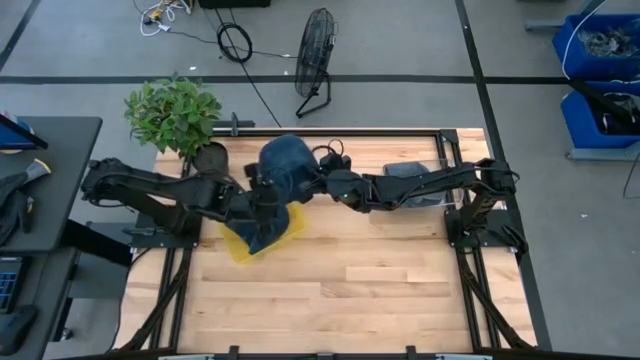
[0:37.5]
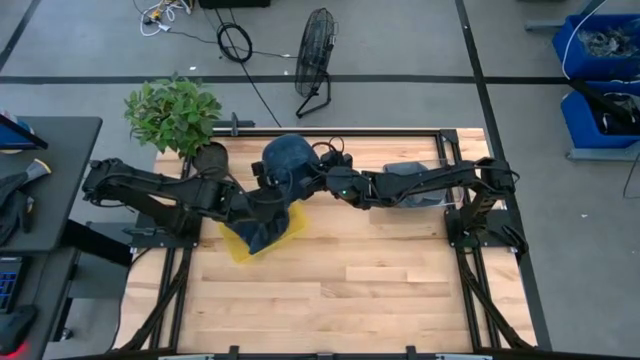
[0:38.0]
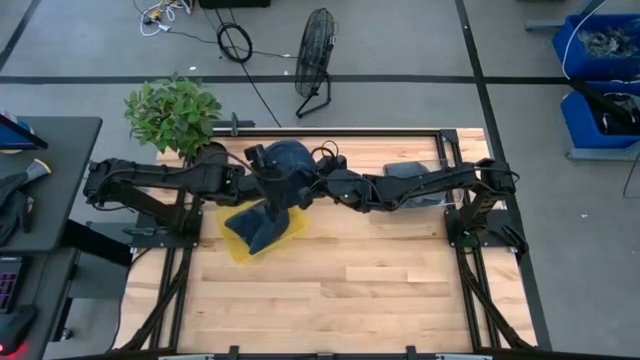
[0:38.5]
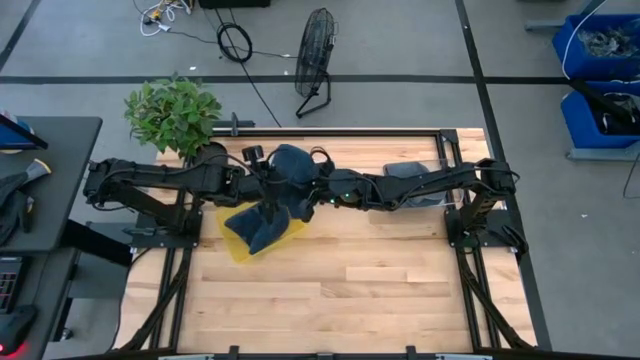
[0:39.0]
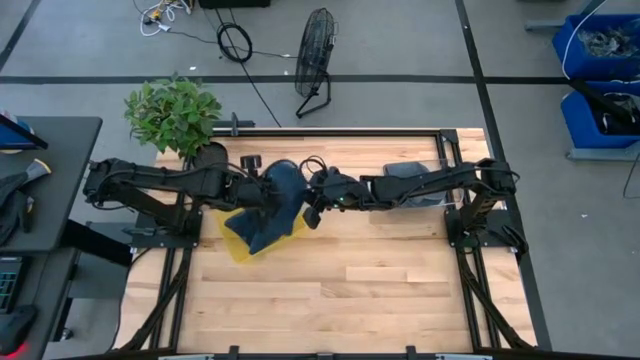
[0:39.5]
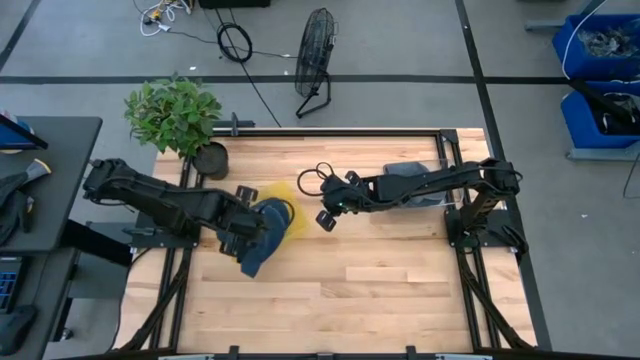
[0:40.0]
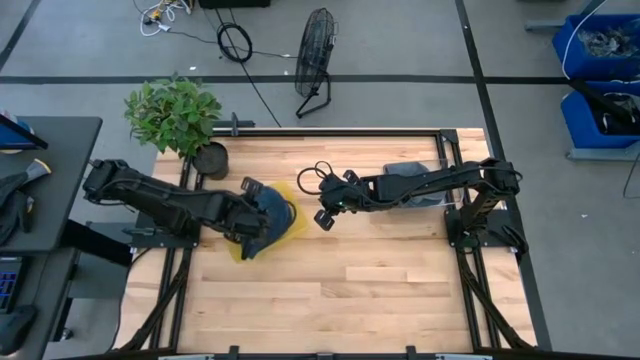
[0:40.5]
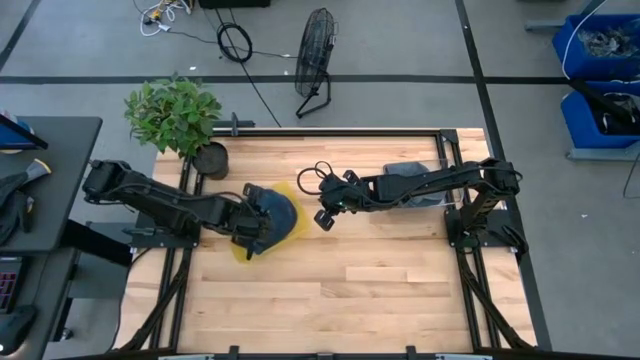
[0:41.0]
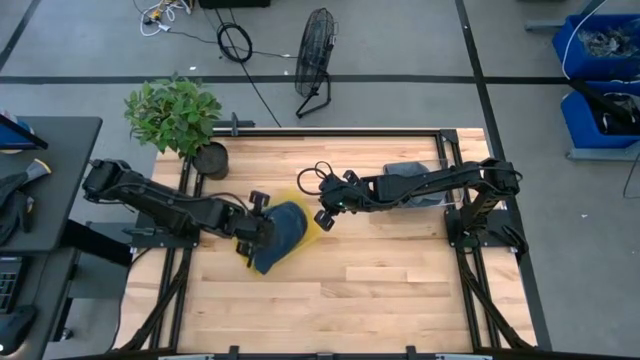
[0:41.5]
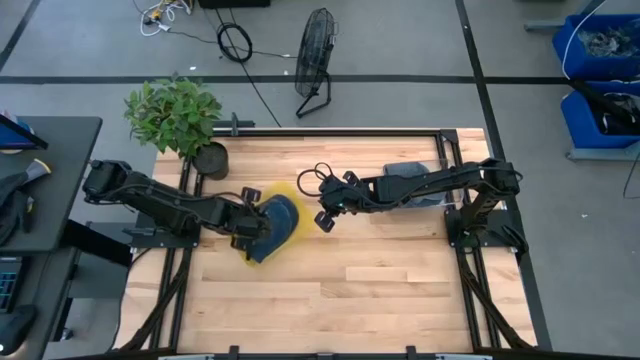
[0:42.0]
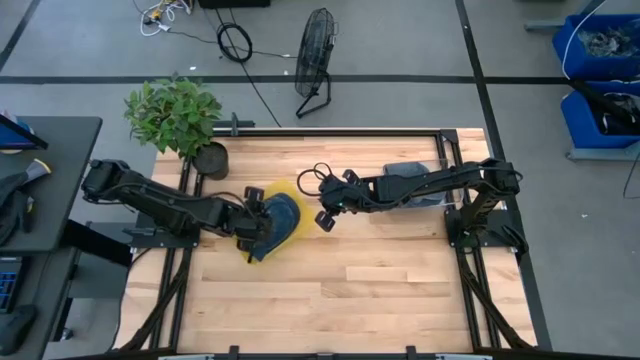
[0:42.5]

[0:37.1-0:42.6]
Task: Pick & Place hat
Put the blue cap into the yellow bin

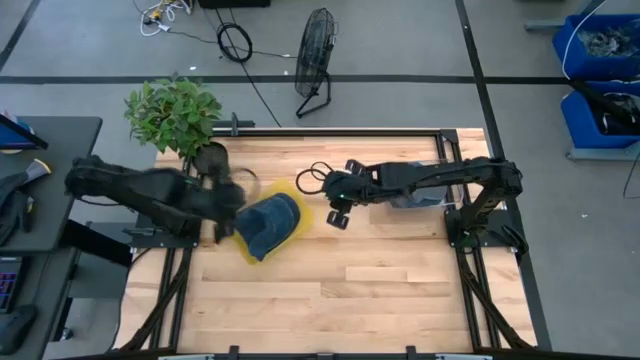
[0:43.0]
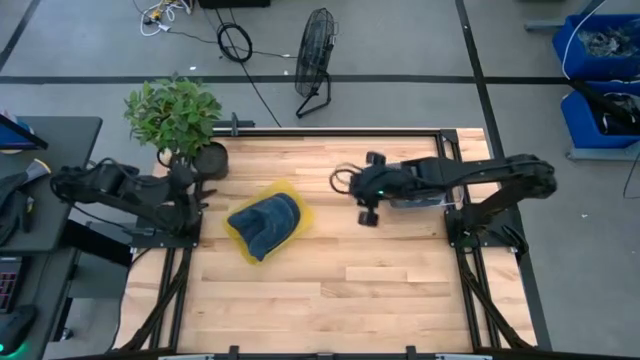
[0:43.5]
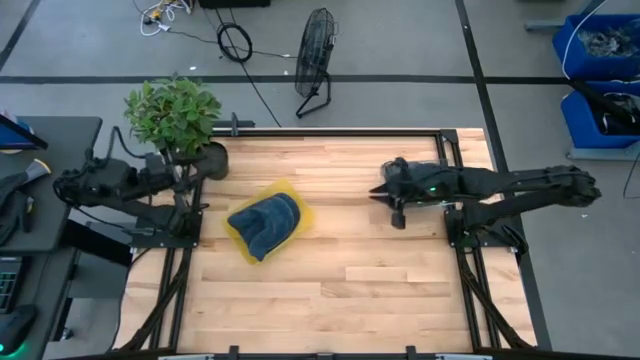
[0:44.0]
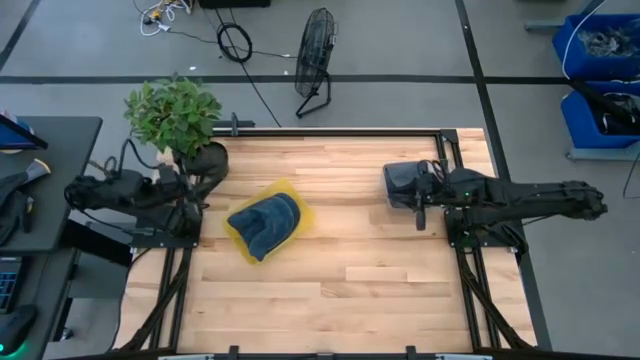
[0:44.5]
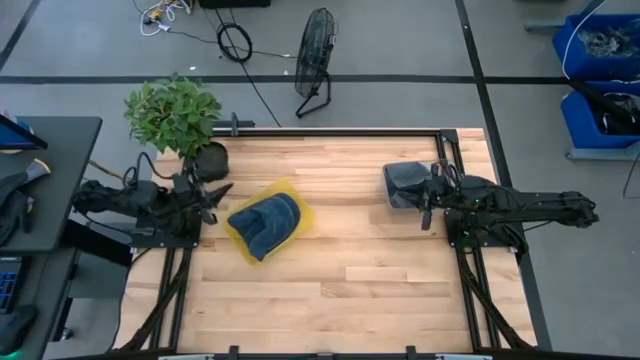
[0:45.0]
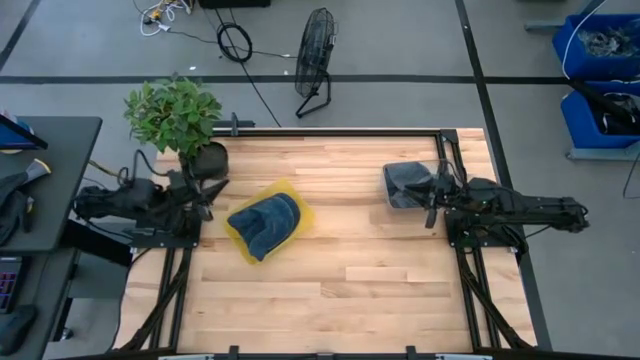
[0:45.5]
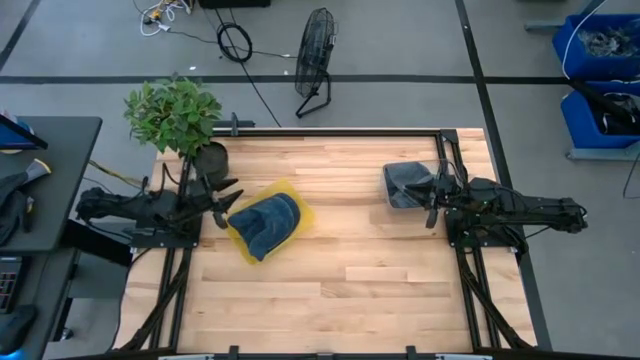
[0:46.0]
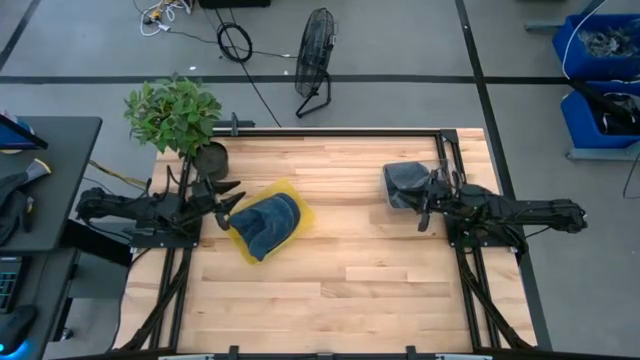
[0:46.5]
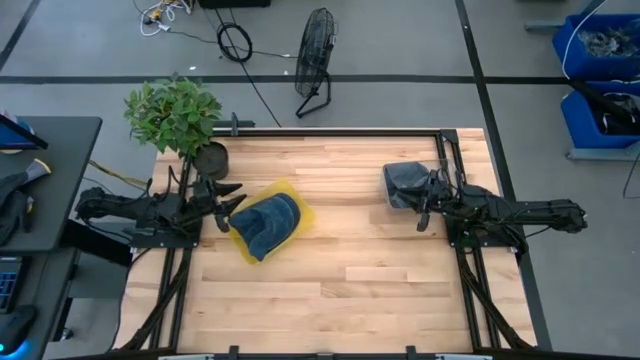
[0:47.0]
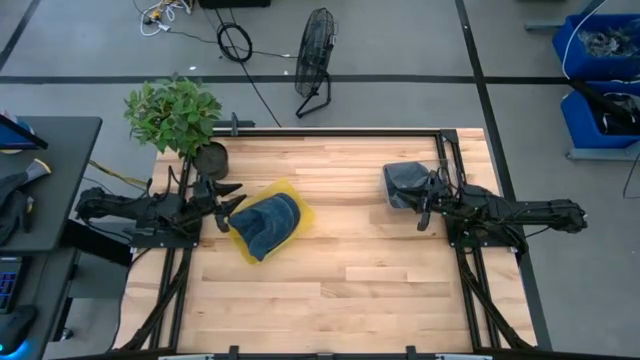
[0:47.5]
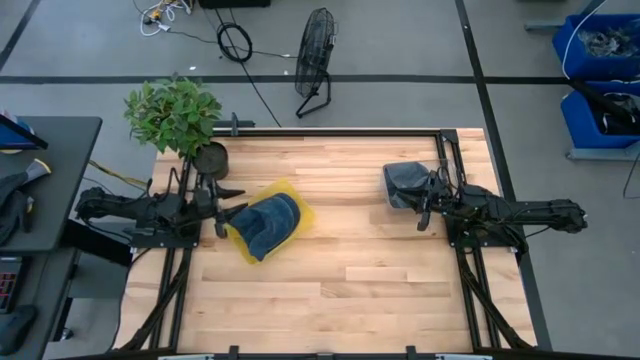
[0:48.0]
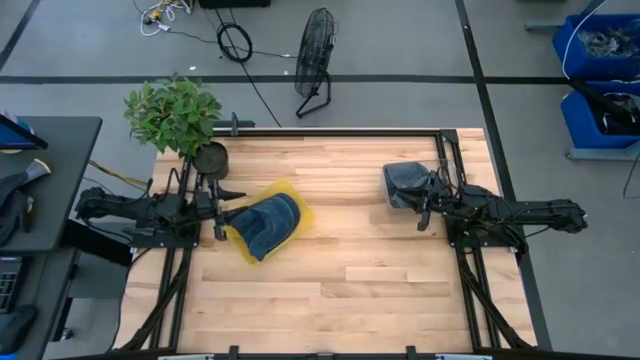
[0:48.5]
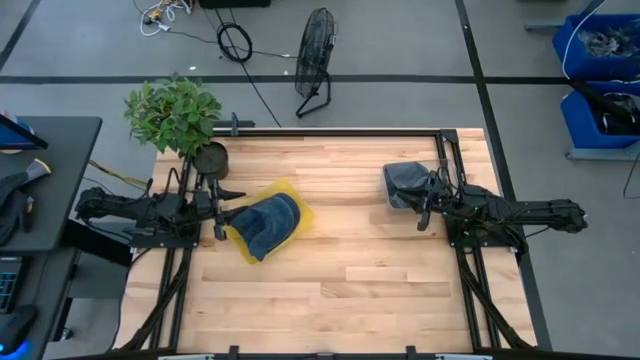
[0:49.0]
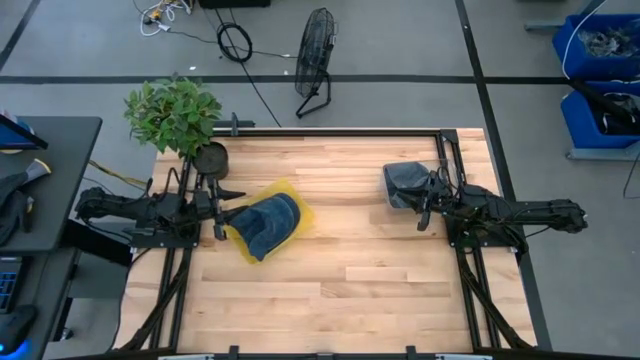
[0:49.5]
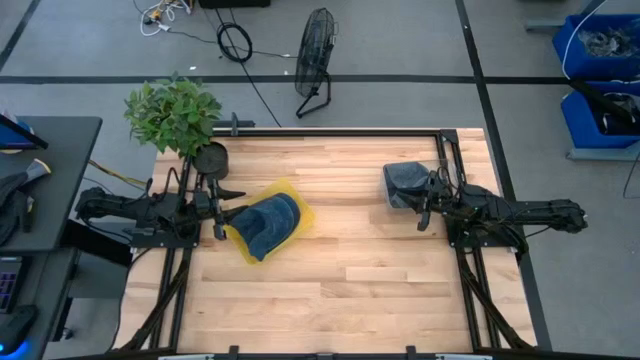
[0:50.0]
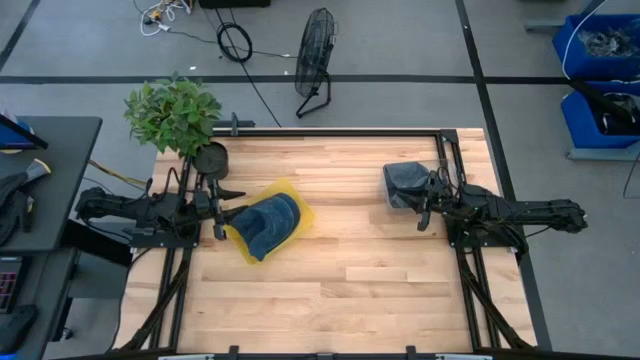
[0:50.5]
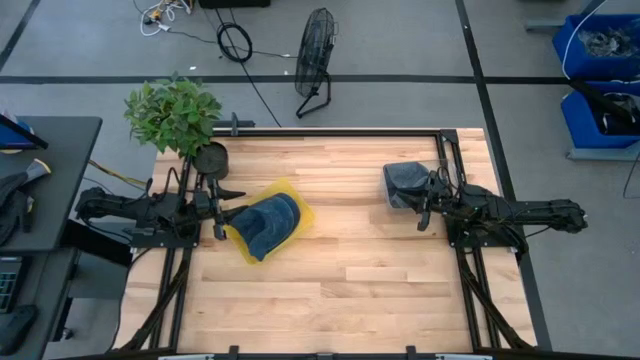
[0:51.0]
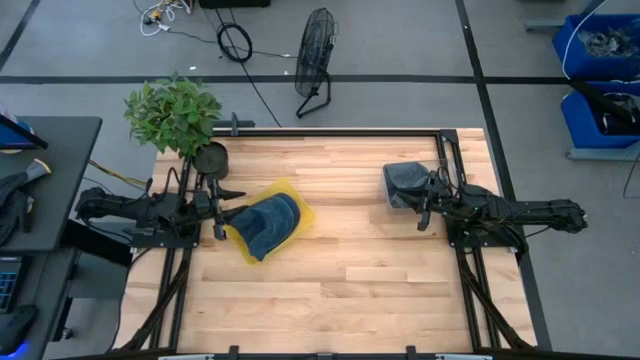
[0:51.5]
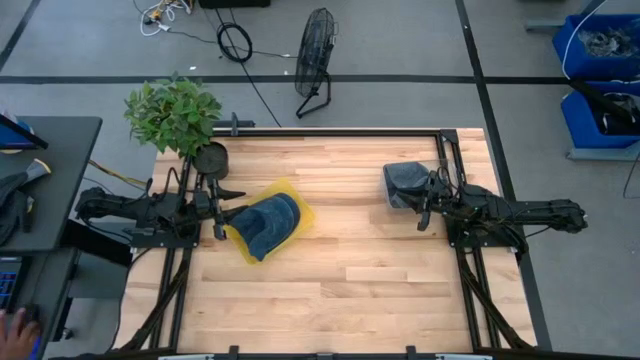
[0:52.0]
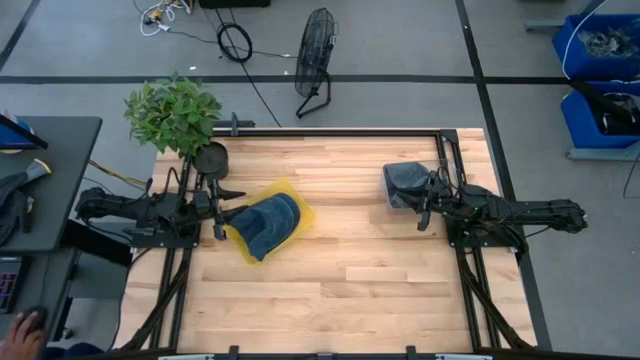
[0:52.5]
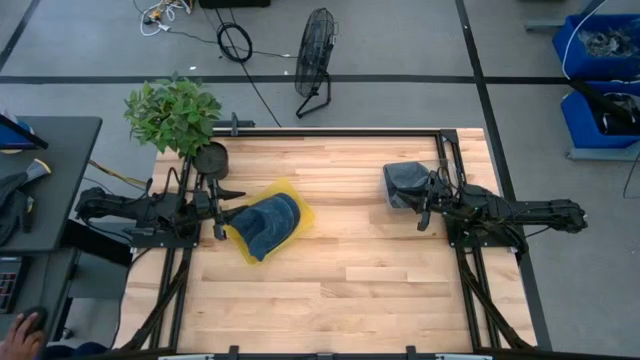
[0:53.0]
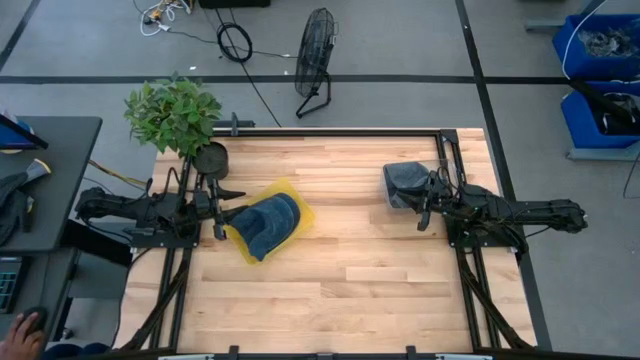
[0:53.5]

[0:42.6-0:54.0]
Return to Home Position

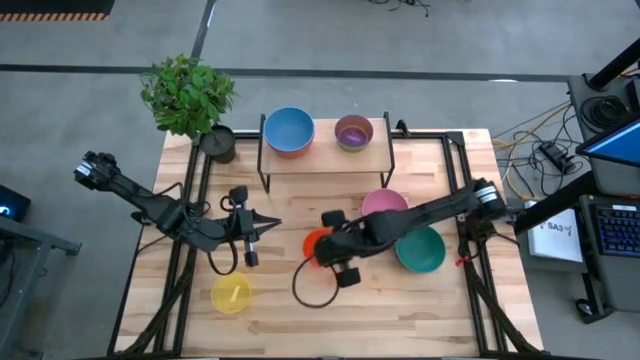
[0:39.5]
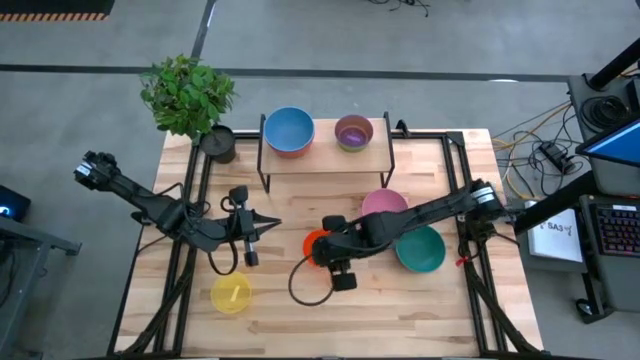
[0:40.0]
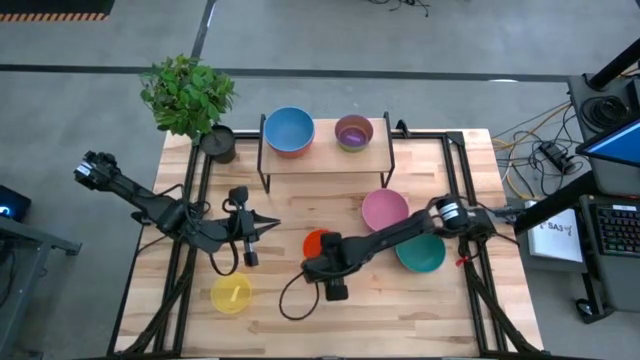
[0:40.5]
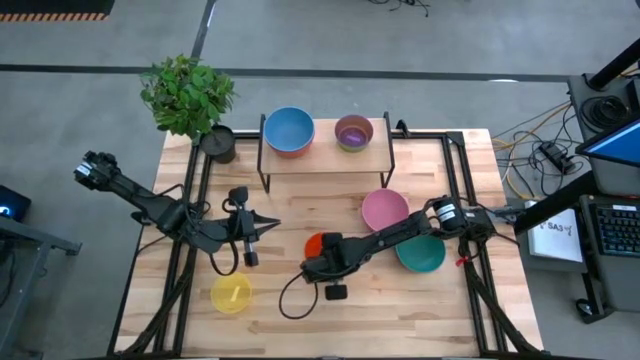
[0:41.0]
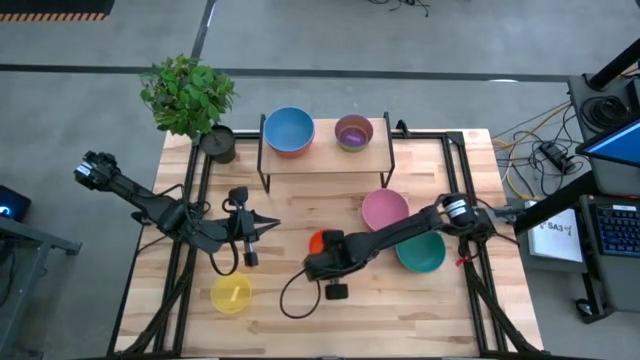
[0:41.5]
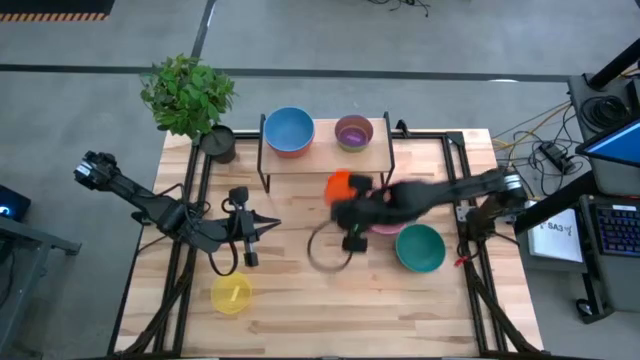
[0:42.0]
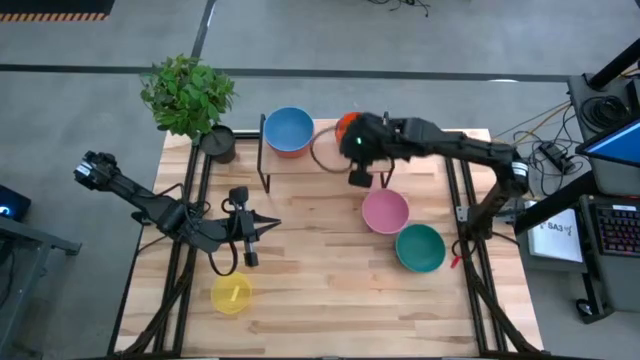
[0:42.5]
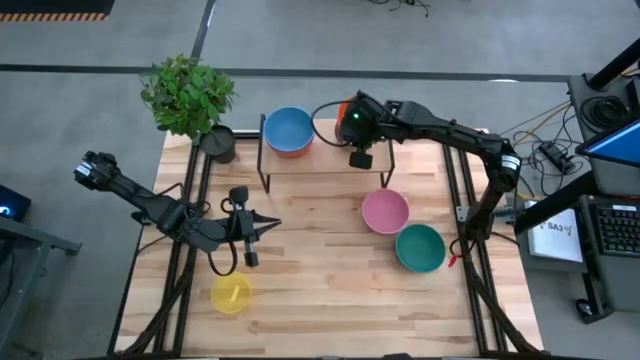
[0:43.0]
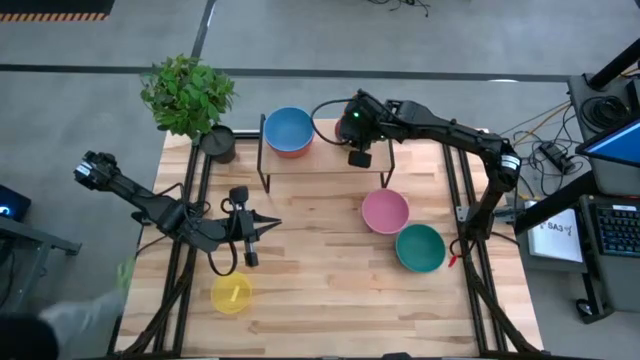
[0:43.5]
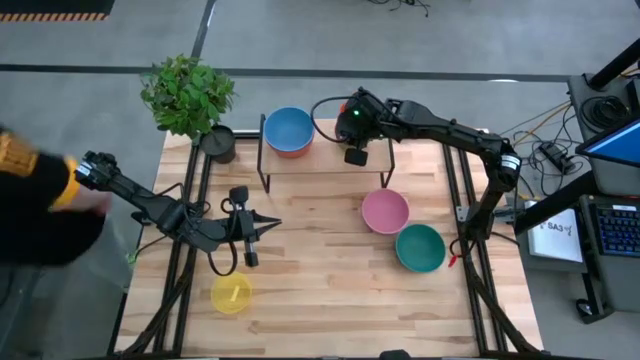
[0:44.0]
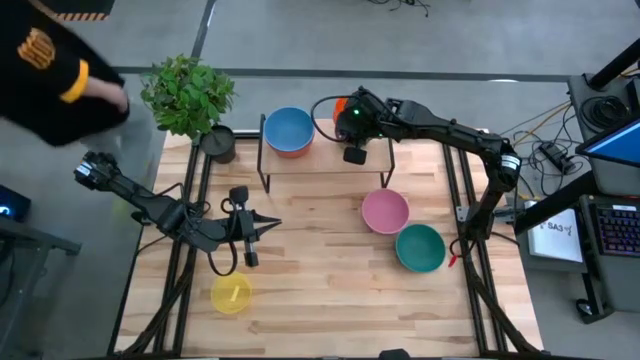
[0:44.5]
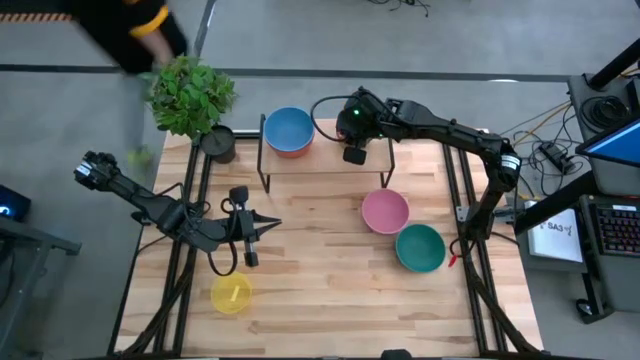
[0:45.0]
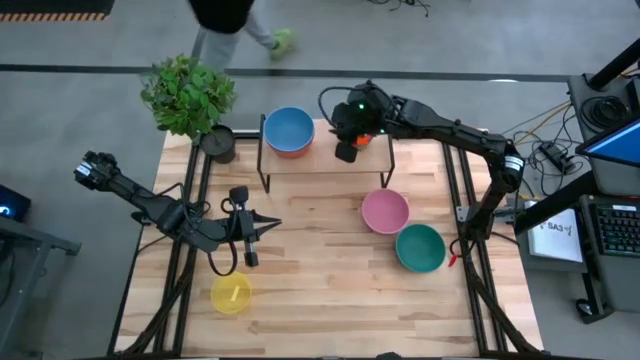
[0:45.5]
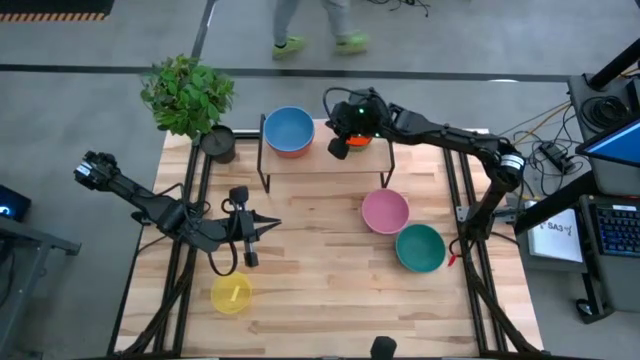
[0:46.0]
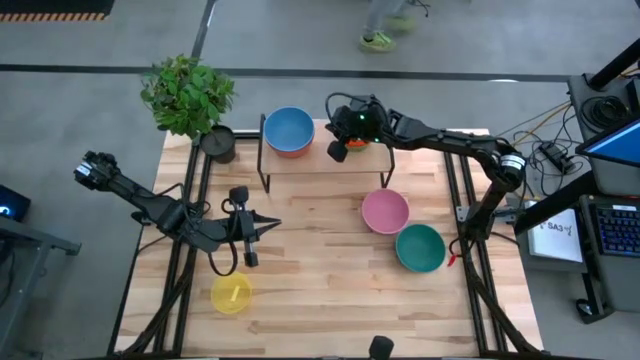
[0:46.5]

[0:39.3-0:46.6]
Task: Place and stack bowls onto a shelf
Stack the small orange bowl on top of the small violet bowl on the shelf
